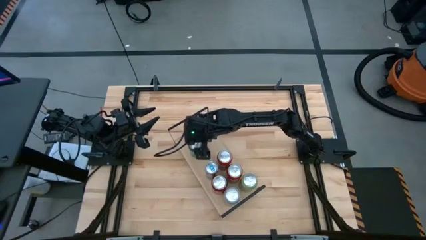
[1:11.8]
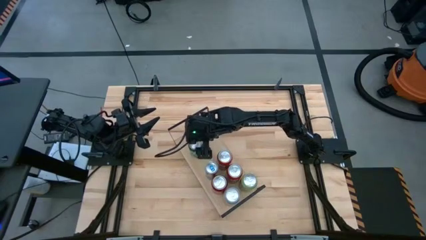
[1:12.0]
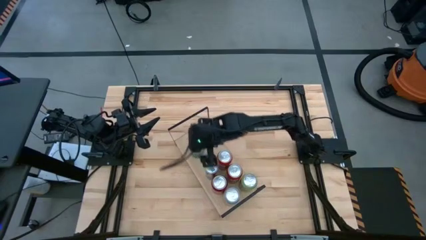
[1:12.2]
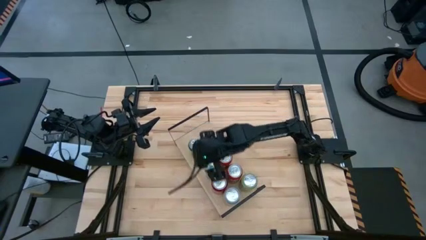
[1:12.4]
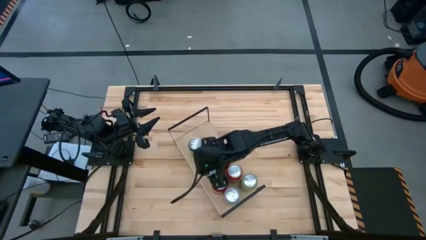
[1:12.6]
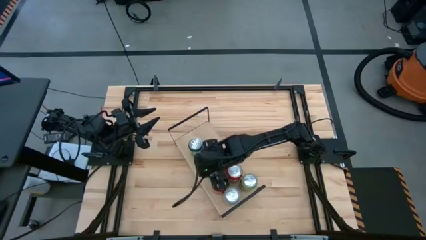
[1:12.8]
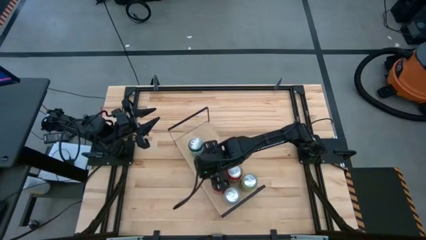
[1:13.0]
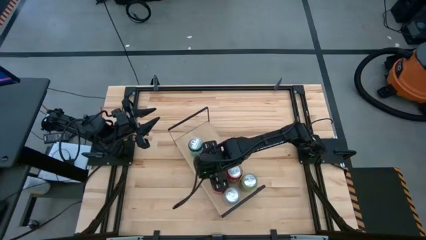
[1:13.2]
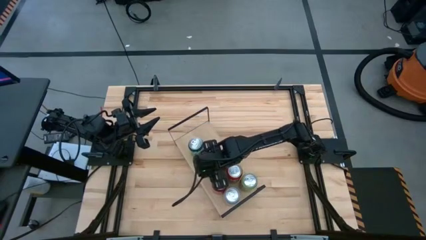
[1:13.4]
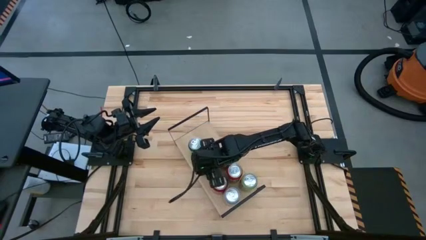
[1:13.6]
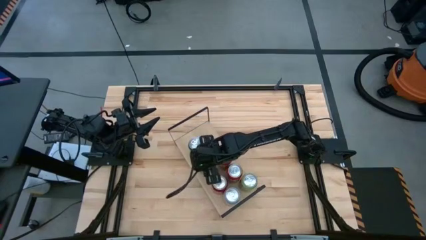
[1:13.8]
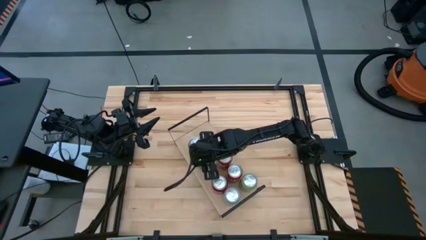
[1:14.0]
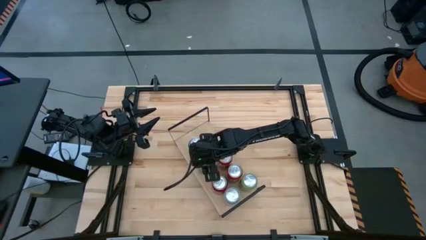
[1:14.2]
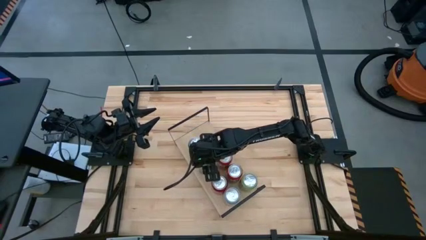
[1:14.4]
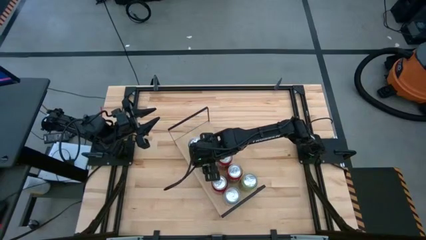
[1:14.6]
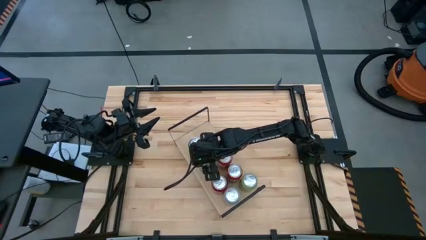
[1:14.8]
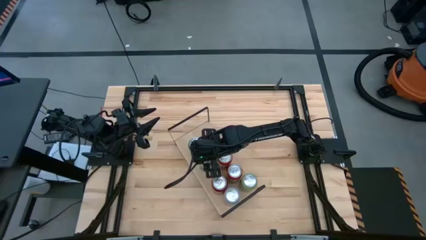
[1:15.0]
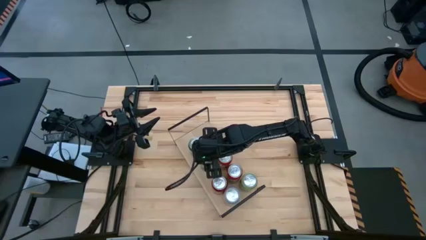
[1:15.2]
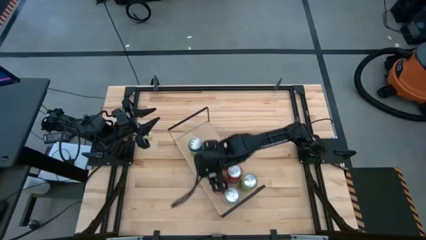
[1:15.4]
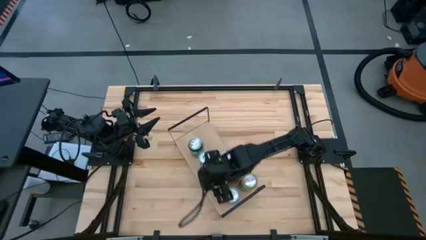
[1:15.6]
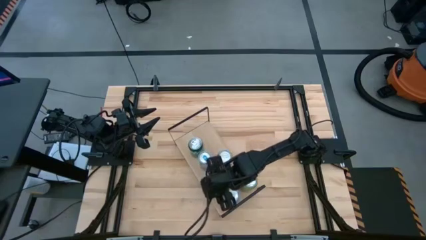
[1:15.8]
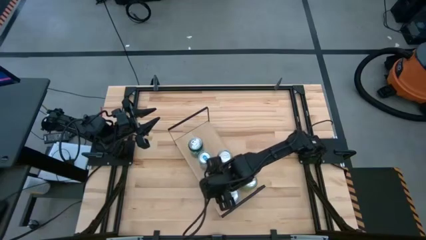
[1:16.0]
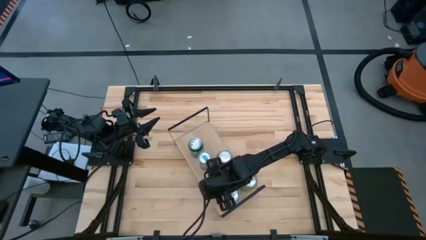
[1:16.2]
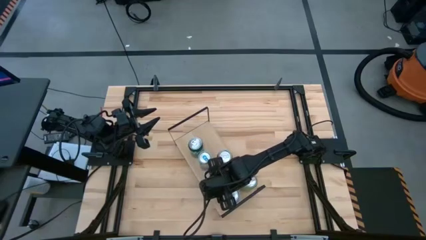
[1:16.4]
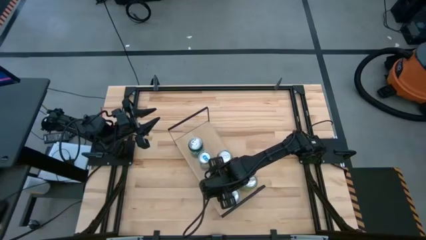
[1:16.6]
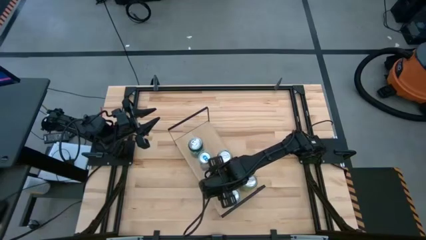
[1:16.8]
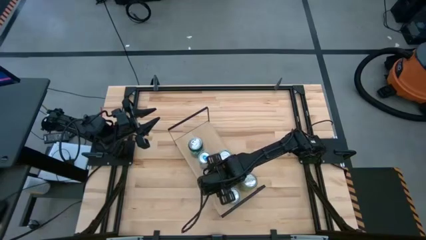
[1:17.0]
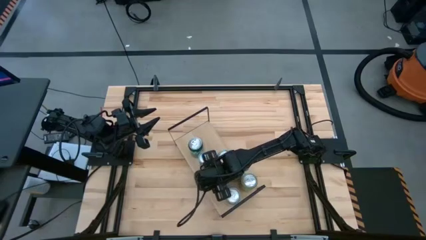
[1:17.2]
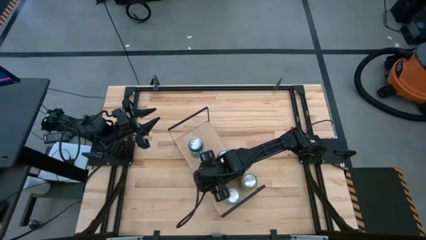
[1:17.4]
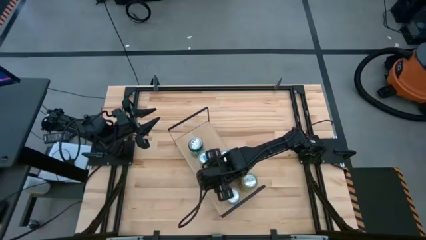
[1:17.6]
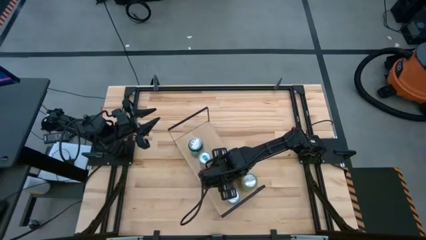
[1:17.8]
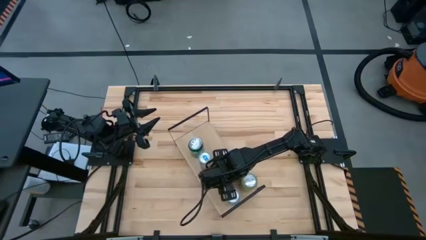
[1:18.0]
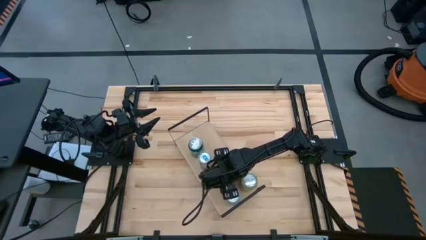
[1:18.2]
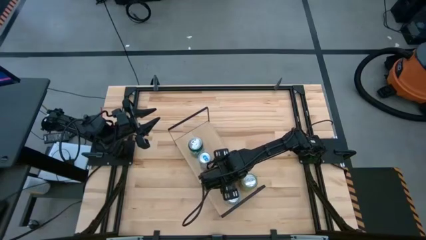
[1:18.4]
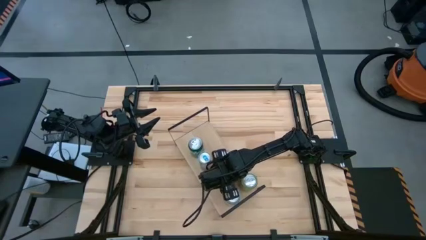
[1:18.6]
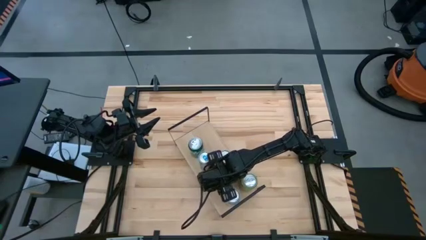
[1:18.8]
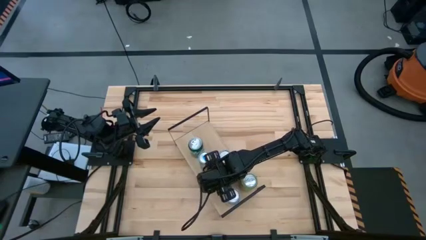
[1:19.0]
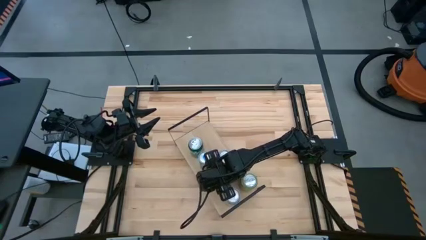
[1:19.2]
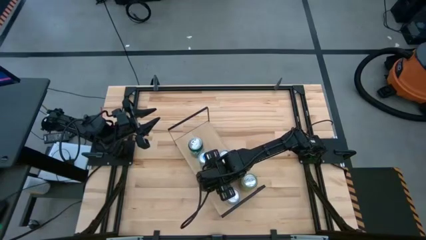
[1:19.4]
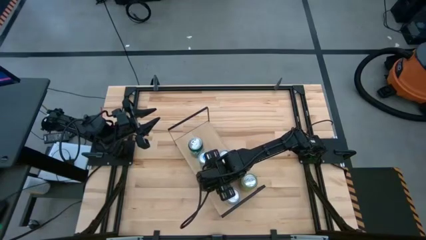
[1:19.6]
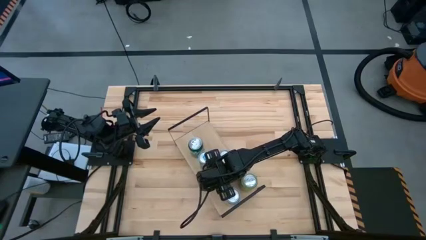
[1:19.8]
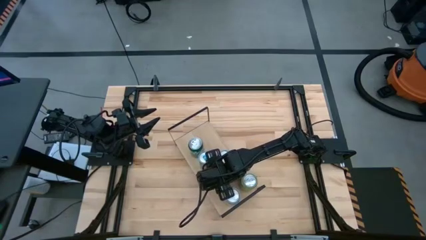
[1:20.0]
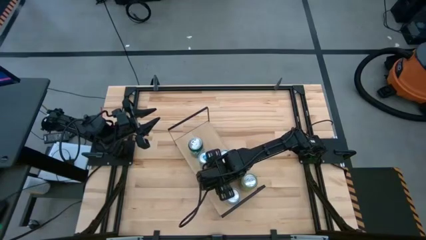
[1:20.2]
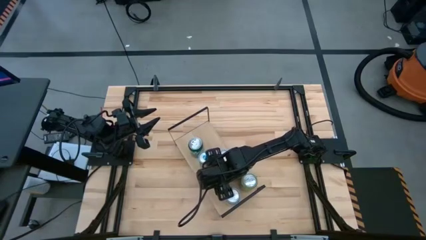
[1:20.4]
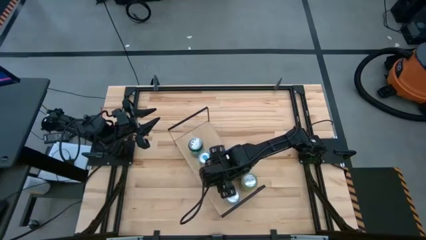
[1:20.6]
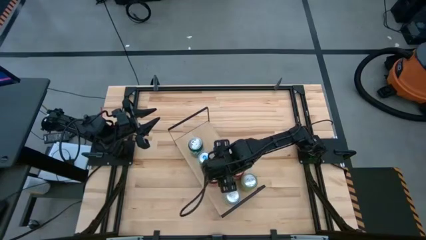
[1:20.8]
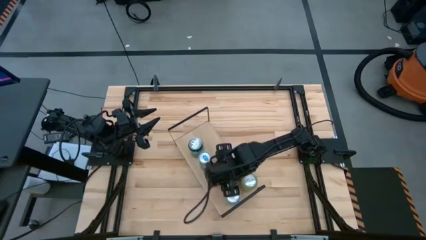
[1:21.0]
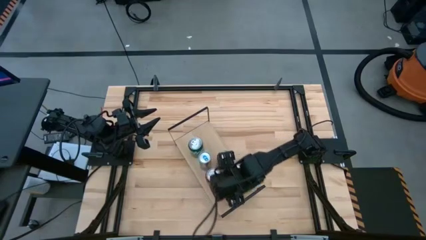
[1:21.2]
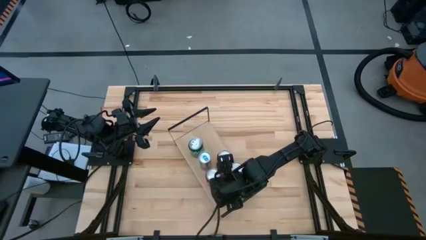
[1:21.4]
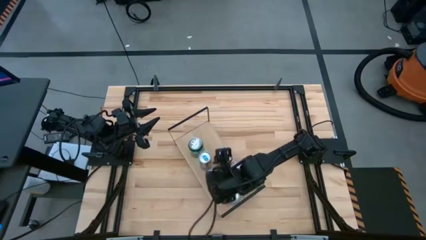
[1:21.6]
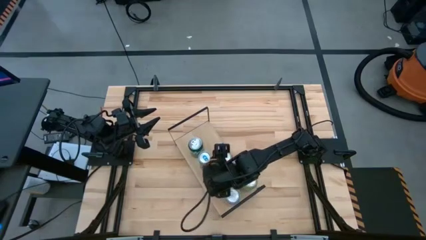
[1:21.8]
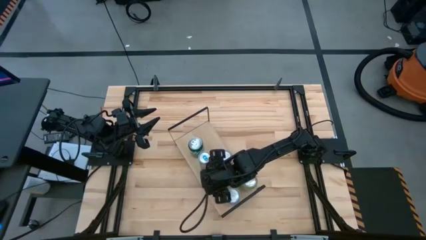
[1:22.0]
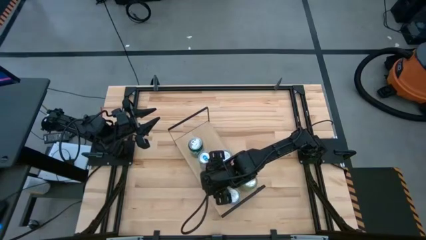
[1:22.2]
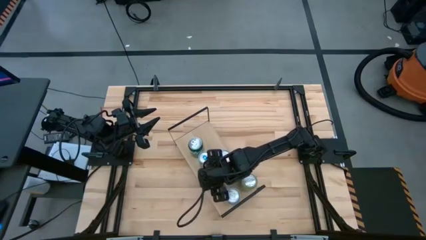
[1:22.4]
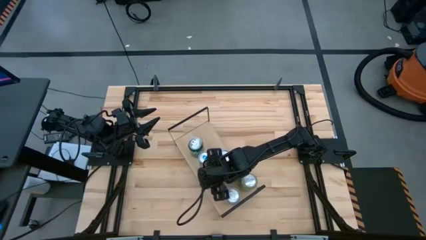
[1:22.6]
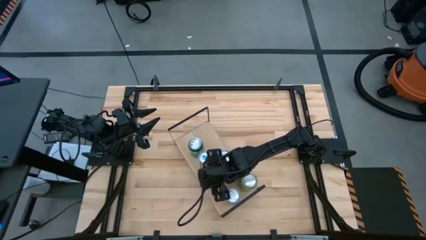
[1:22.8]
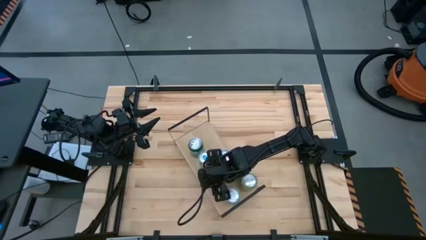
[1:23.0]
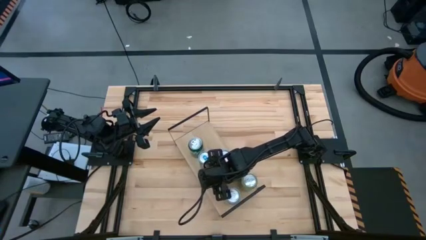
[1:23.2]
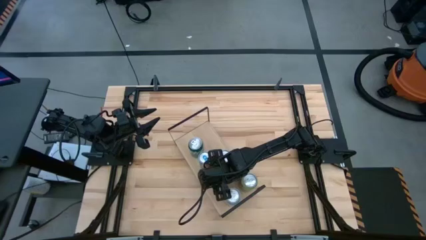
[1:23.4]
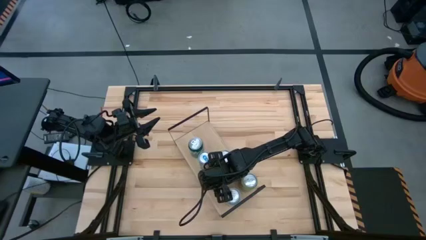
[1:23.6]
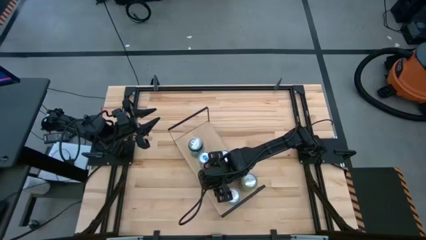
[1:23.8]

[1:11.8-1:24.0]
Task: Place canned beverage on shelf
Adjust the soda cans on the shelf

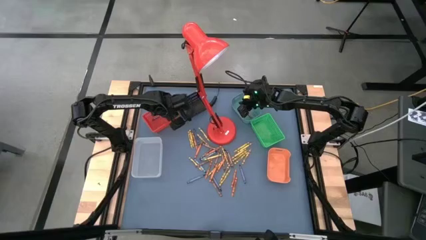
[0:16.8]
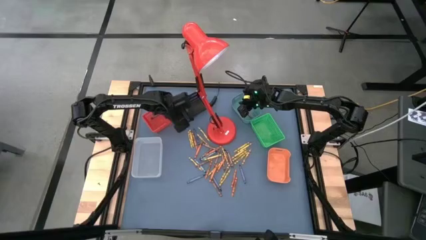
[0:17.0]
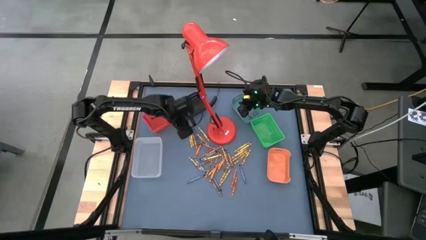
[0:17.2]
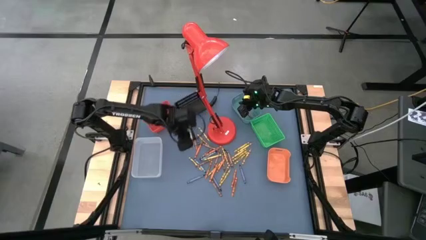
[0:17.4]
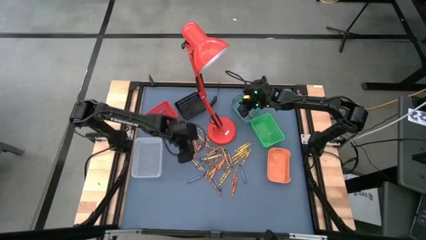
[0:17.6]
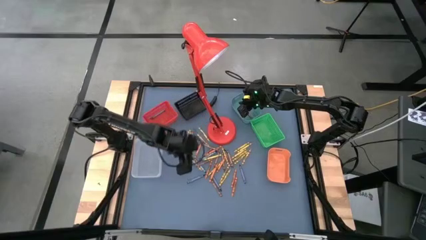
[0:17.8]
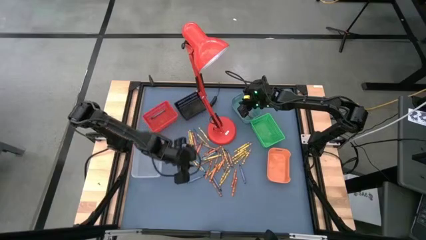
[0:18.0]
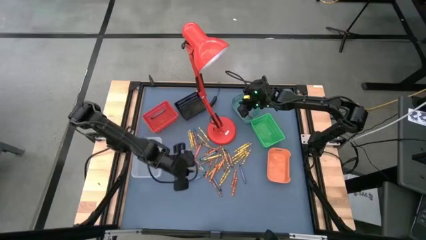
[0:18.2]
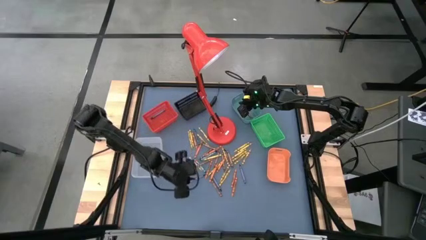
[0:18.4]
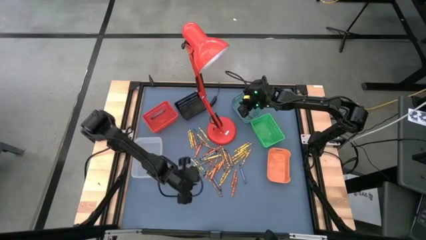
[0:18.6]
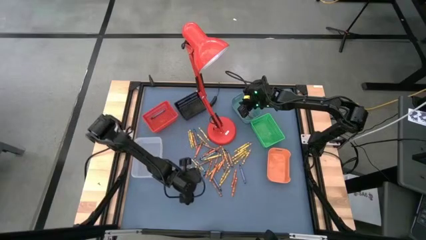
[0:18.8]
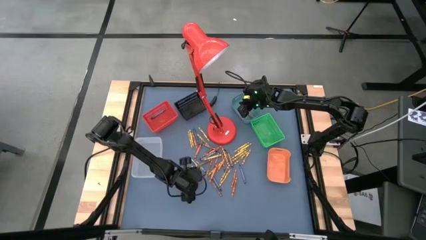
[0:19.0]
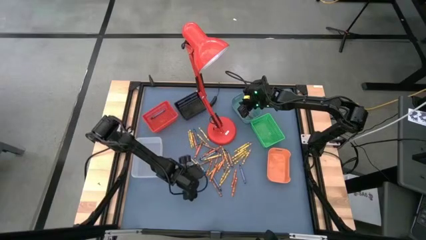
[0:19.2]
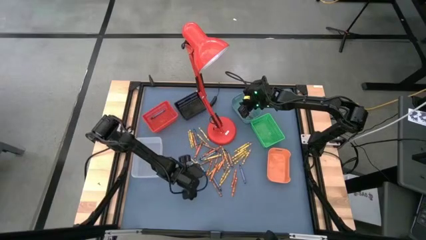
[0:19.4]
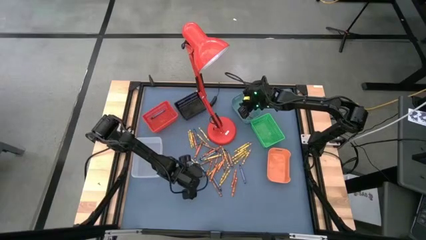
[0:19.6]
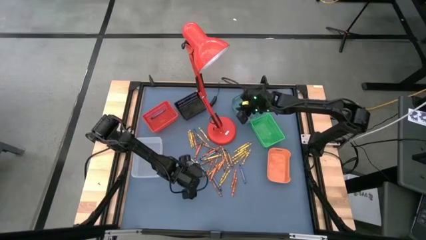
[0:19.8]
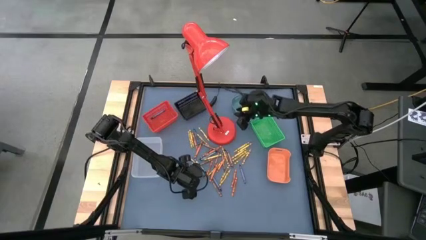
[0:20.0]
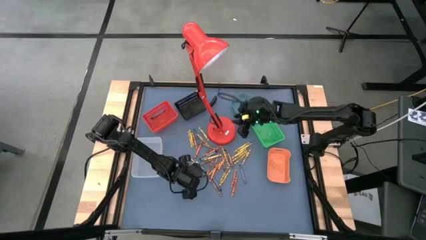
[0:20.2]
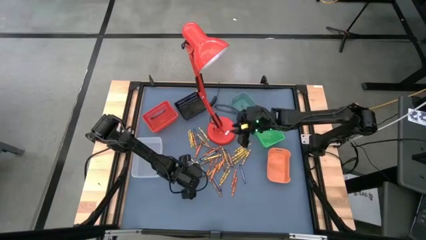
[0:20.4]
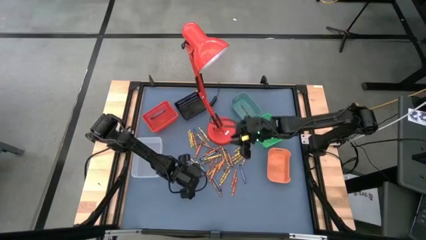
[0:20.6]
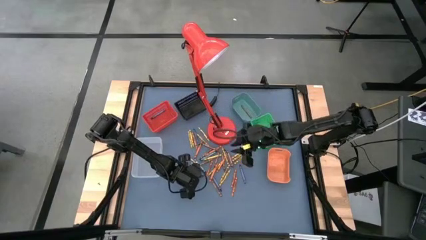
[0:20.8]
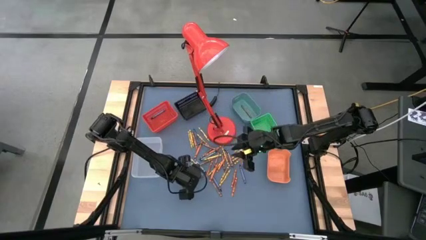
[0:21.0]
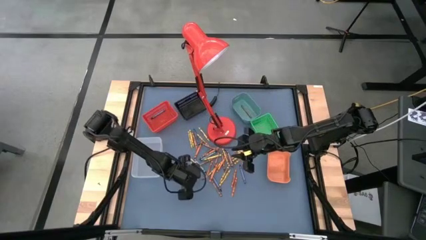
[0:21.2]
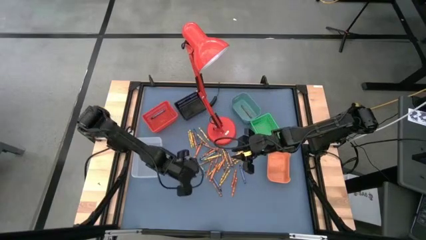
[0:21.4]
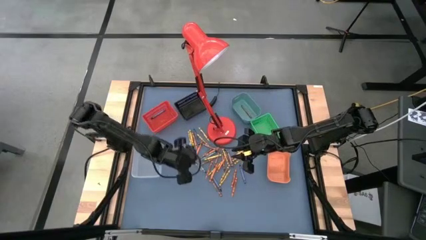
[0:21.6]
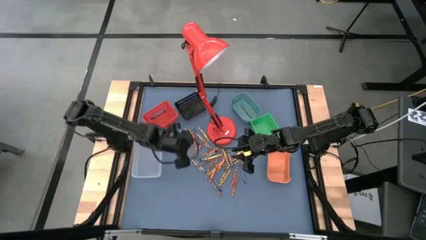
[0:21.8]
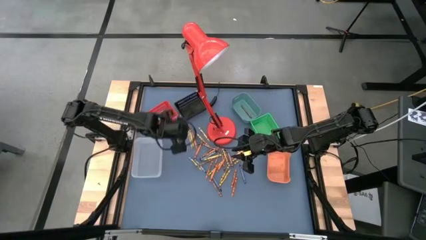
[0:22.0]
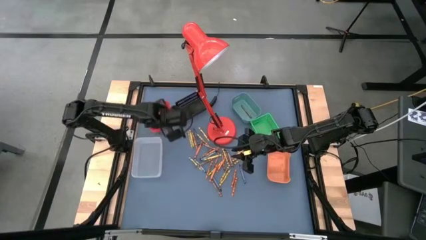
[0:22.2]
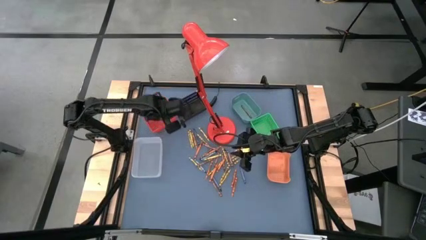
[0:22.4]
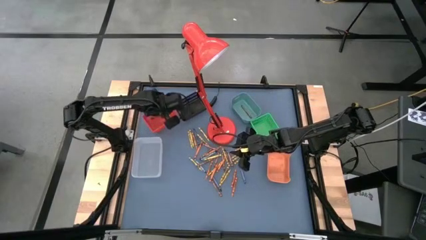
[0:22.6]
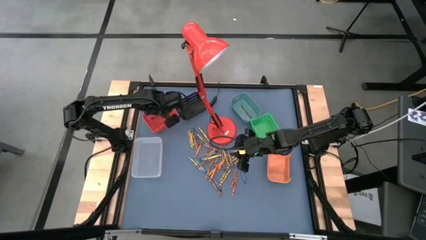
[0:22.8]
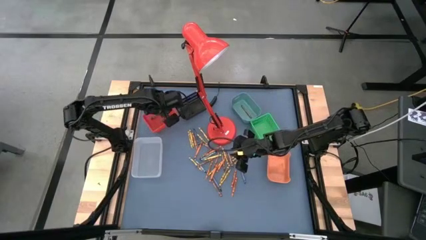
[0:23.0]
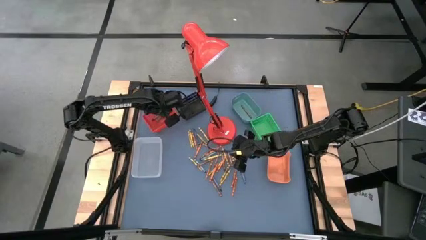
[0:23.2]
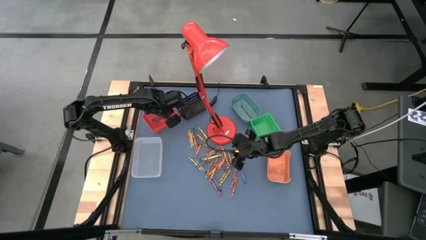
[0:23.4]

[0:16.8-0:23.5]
Task: Sort crayons
Put the blue crayon into the middle left red bin
